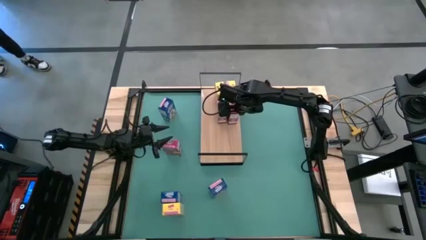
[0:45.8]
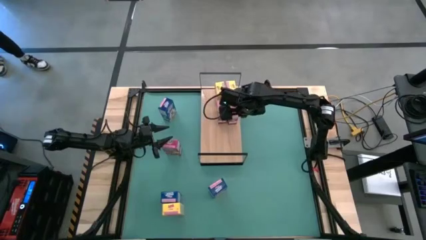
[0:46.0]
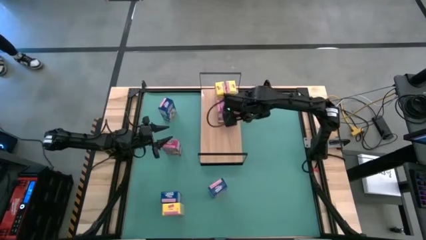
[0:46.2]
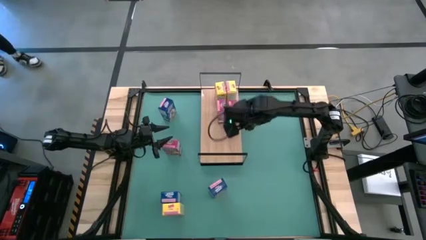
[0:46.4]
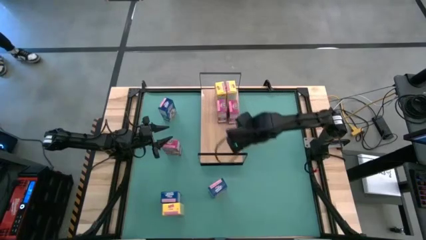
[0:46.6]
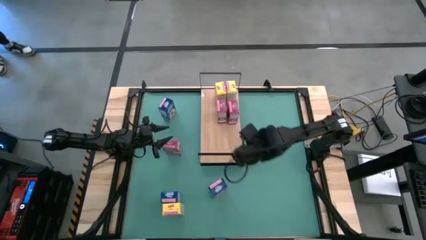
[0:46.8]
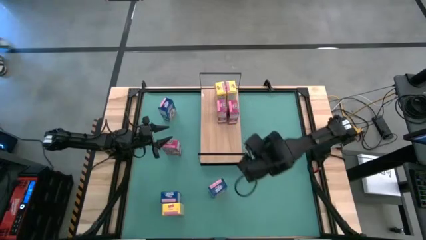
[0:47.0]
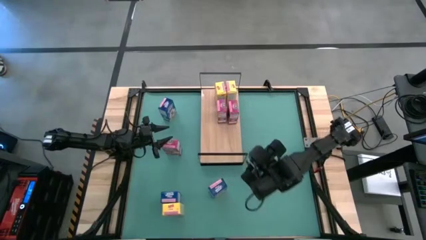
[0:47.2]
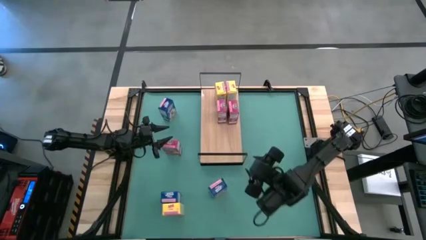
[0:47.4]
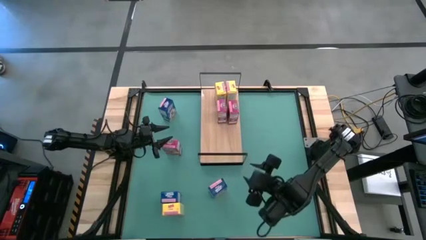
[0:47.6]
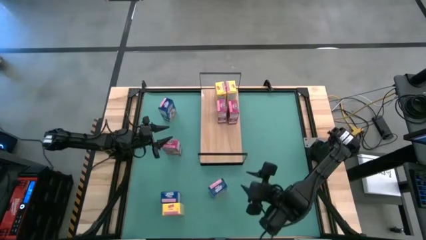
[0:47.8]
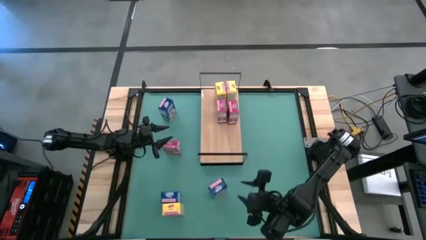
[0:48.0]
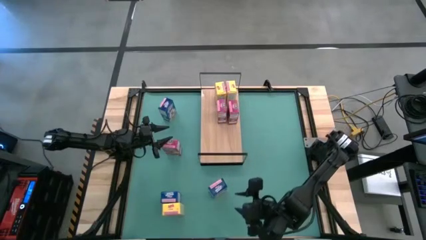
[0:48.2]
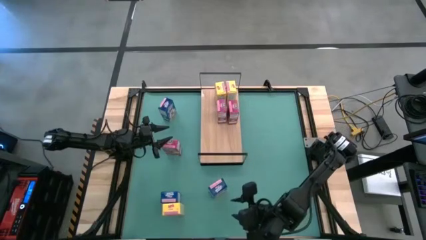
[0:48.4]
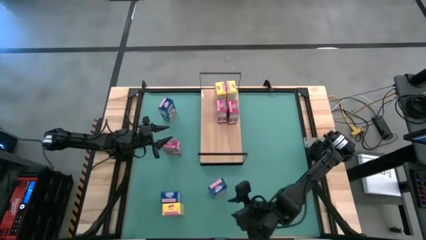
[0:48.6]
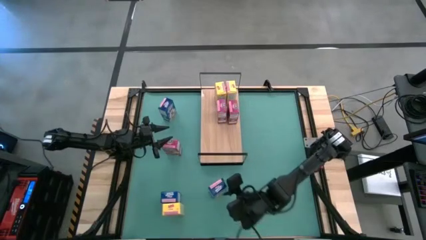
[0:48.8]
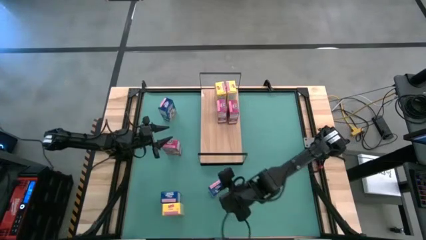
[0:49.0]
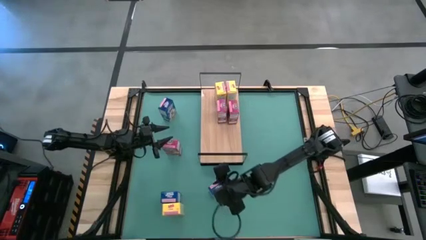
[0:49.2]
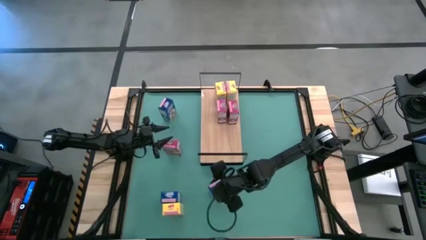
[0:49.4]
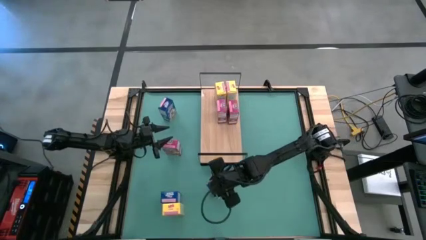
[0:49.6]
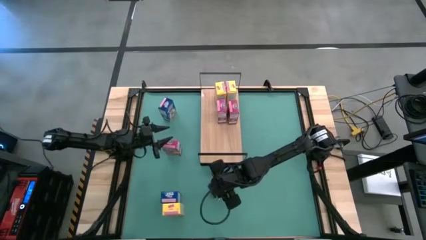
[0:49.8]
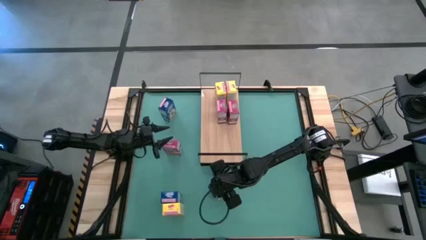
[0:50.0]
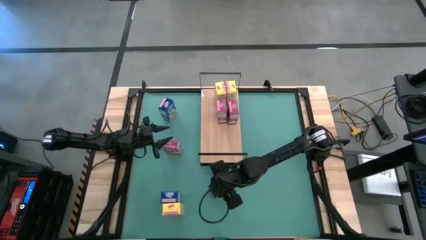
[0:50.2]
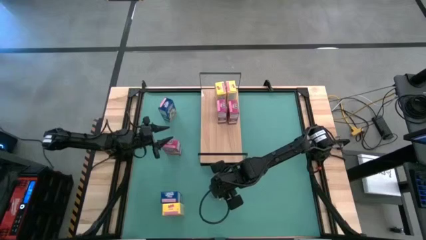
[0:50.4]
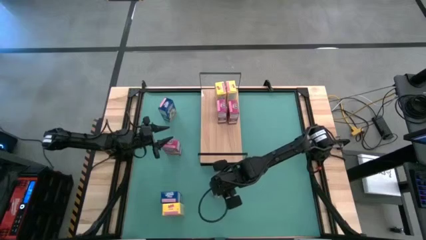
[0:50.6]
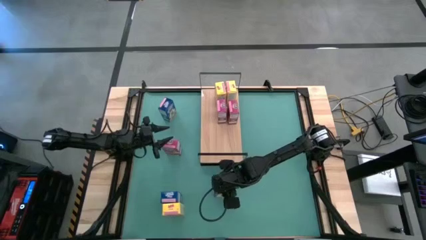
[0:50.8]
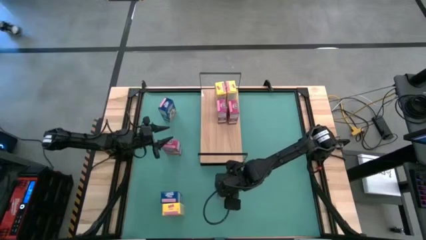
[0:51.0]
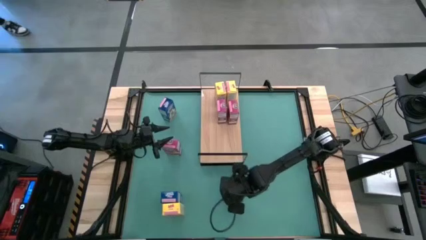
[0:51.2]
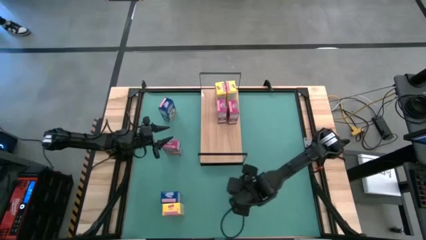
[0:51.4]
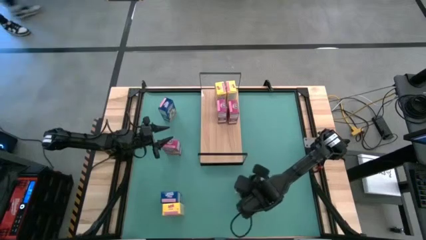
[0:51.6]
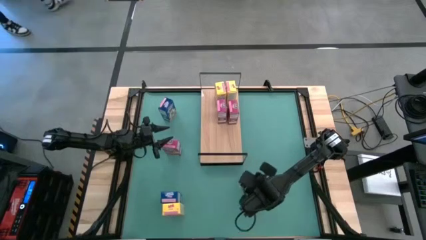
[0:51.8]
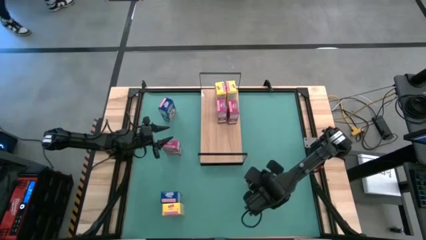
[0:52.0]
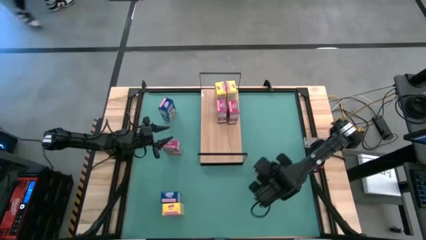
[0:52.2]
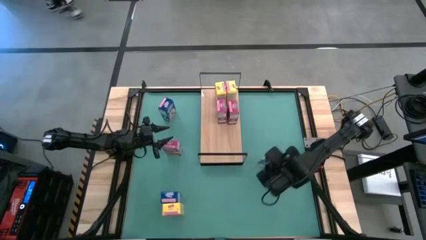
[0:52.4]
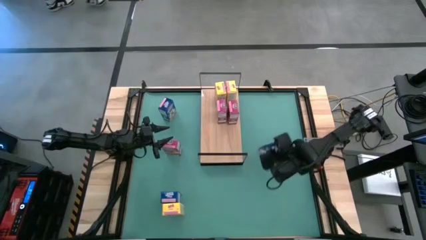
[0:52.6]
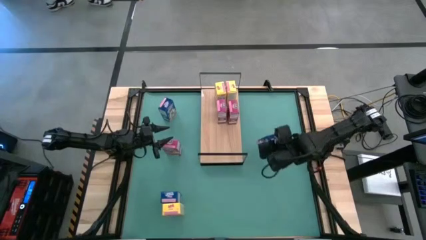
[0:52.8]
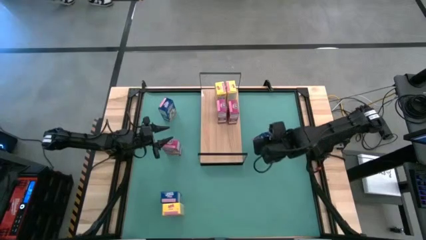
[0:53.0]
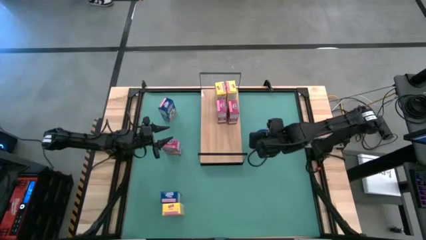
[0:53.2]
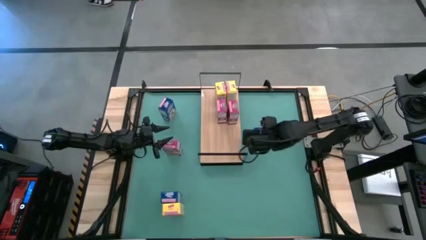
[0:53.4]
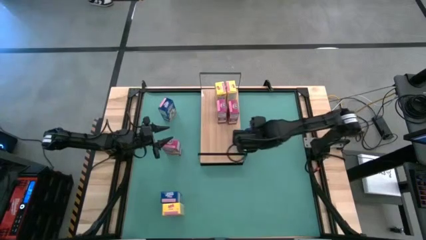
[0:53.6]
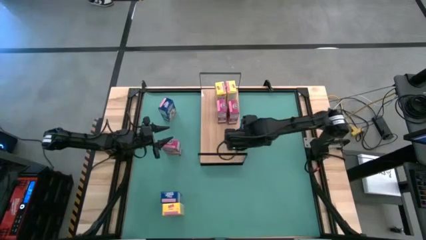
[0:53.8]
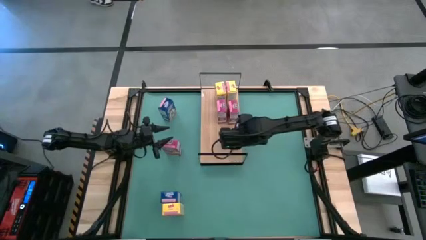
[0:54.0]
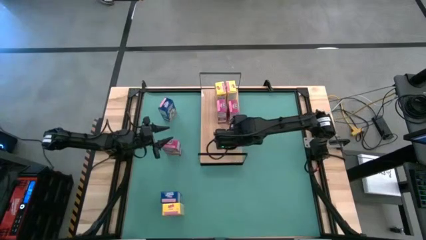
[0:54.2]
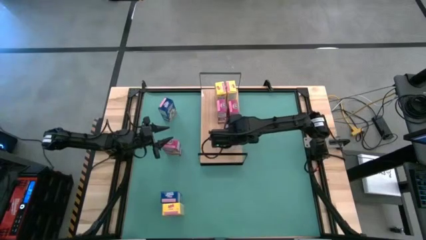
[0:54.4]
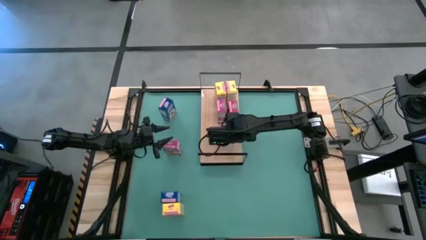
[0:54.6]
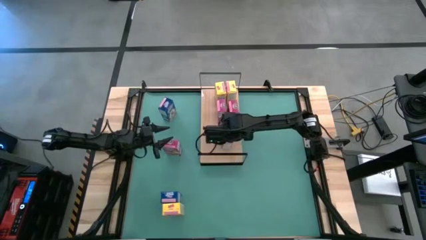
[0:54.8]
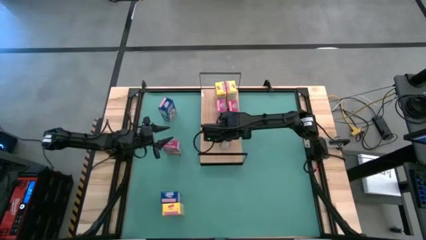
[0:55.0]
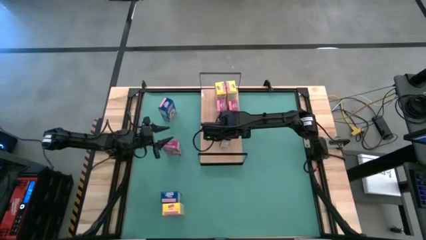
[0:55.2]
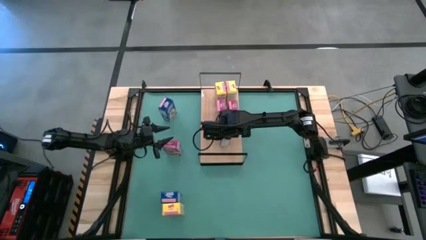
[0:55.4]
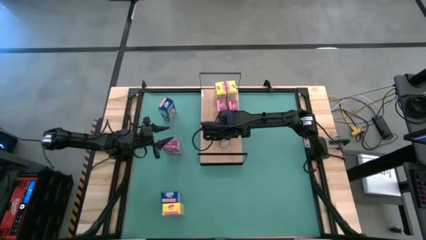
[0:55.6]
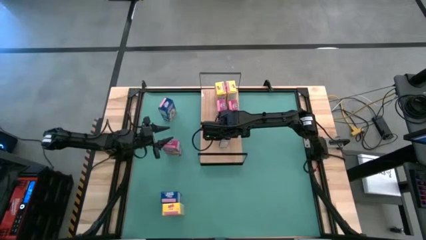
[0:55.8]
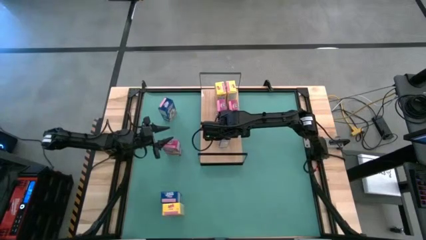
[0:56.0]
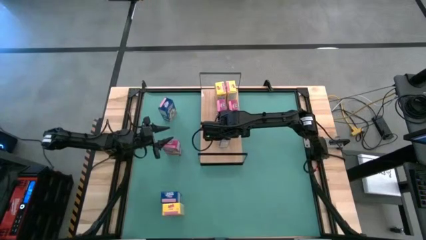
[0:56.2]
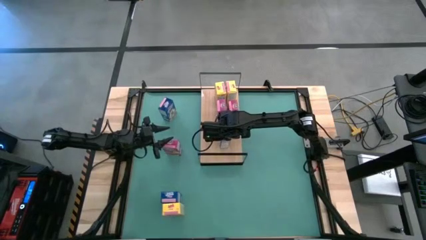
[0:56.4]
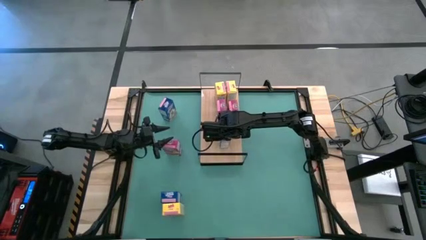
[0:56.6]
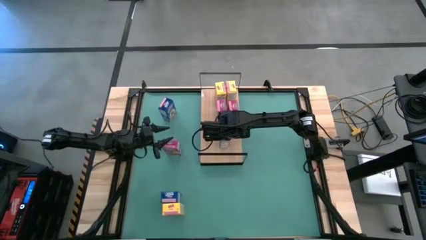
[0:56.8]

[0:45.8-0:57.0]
Task: Stack cereal on shelf
Put the bottom right blue cereal box on the shelf
